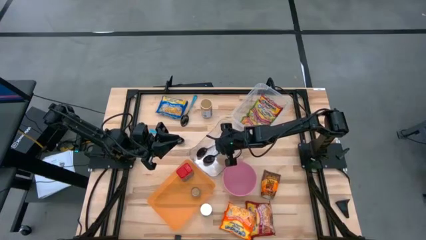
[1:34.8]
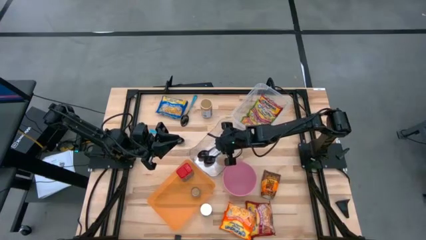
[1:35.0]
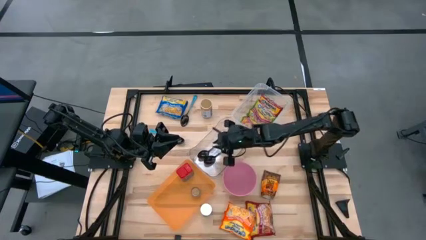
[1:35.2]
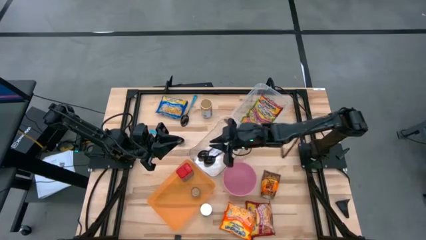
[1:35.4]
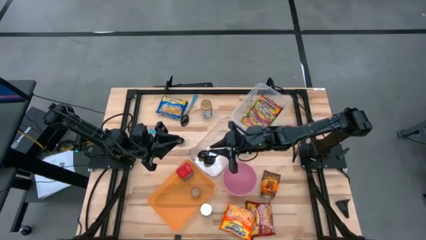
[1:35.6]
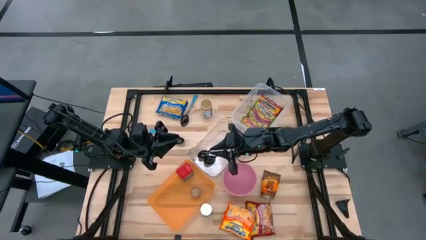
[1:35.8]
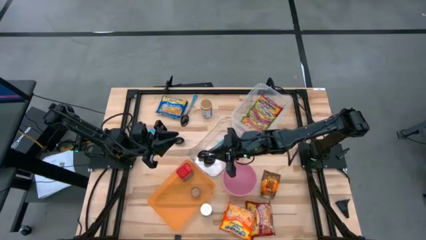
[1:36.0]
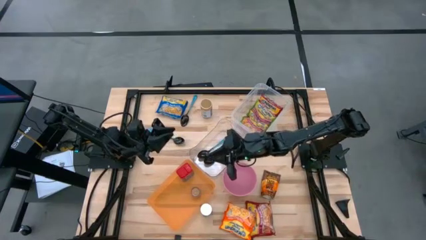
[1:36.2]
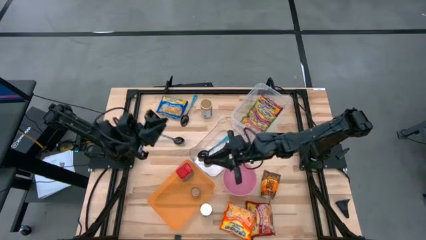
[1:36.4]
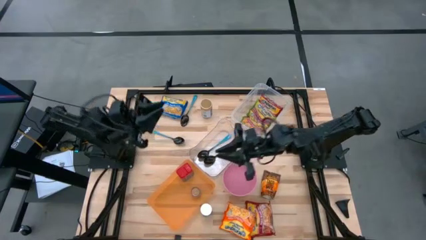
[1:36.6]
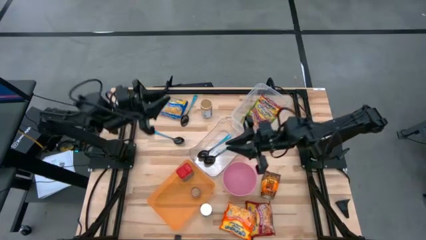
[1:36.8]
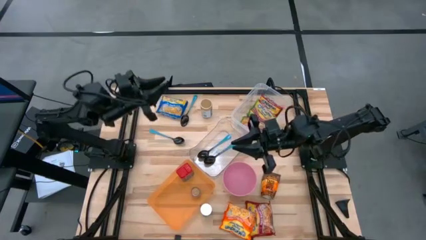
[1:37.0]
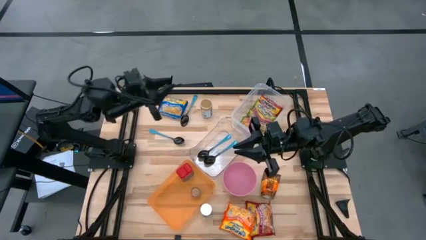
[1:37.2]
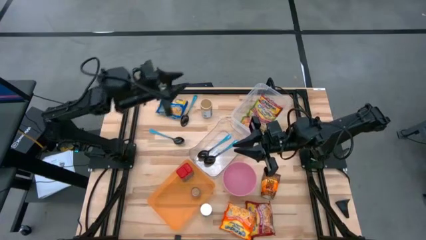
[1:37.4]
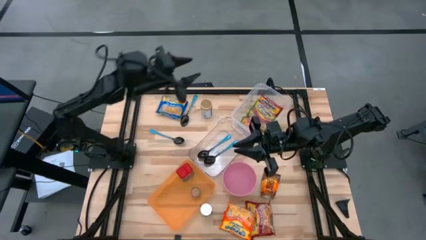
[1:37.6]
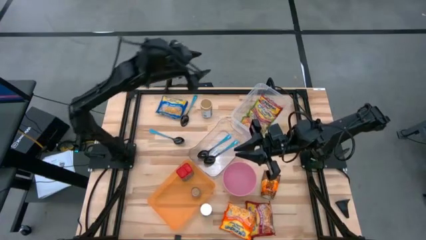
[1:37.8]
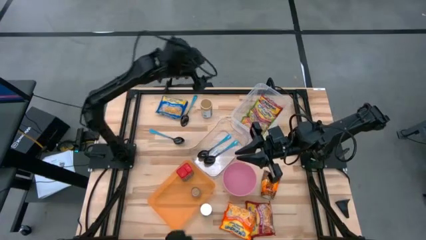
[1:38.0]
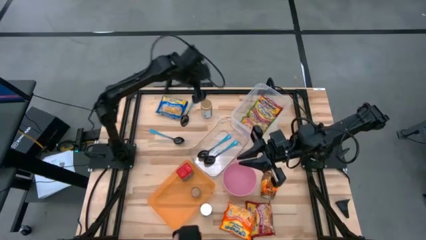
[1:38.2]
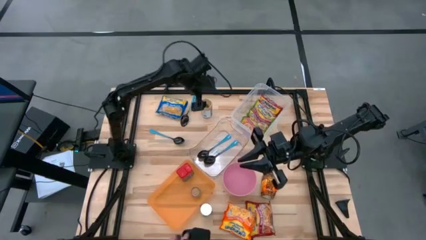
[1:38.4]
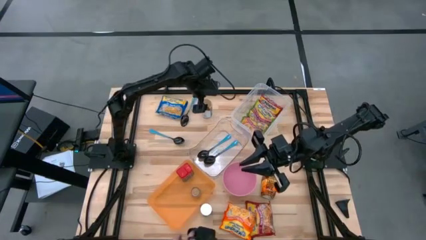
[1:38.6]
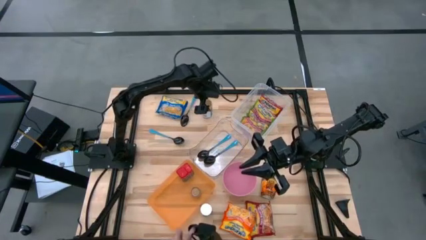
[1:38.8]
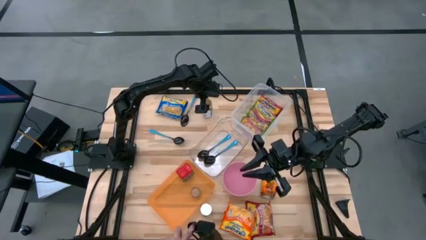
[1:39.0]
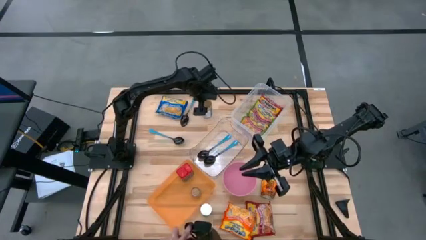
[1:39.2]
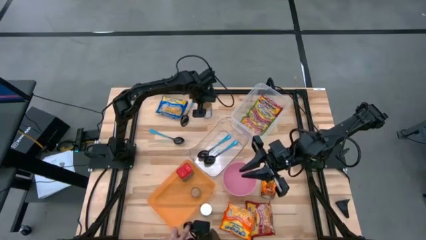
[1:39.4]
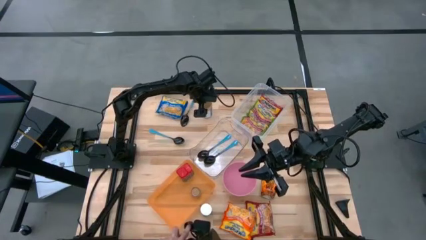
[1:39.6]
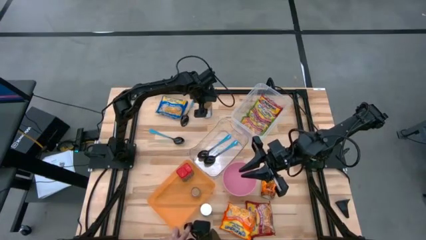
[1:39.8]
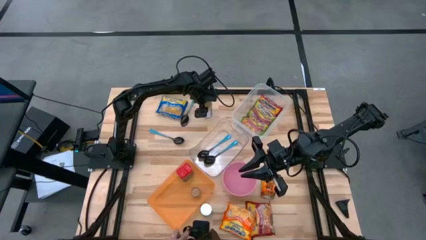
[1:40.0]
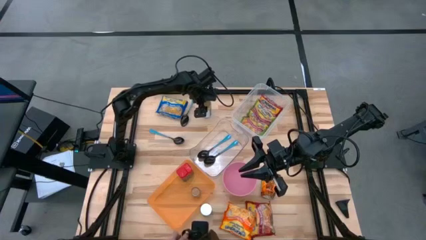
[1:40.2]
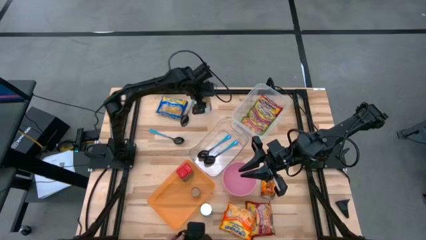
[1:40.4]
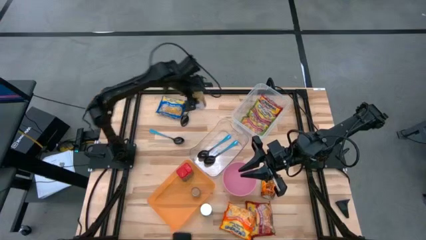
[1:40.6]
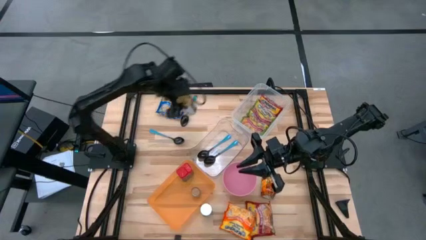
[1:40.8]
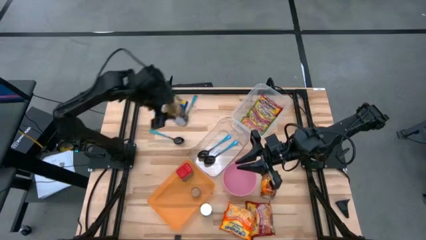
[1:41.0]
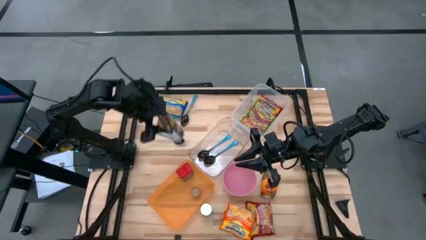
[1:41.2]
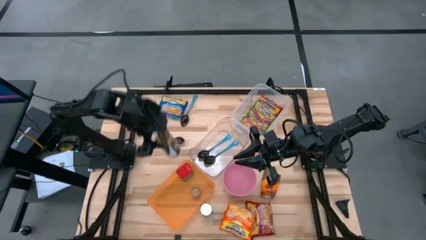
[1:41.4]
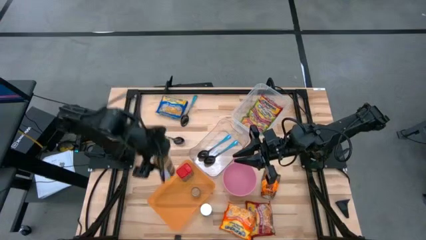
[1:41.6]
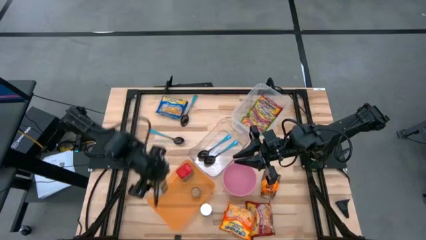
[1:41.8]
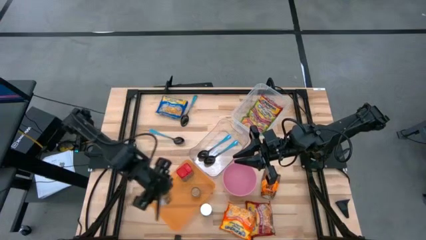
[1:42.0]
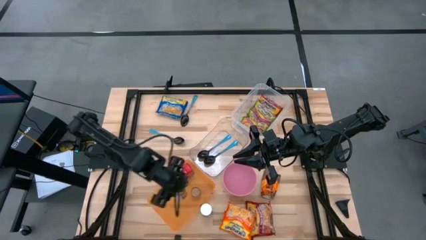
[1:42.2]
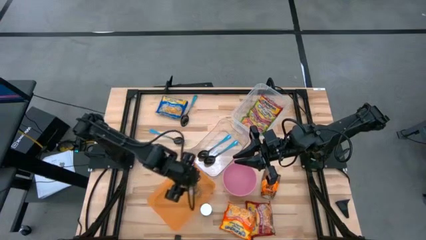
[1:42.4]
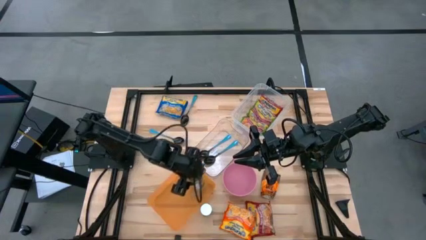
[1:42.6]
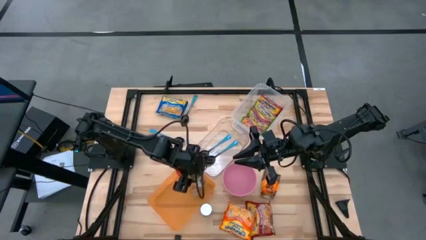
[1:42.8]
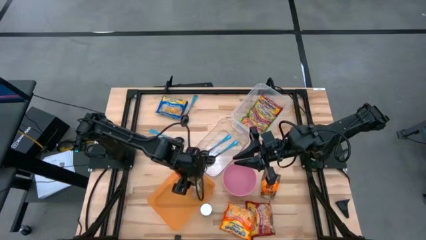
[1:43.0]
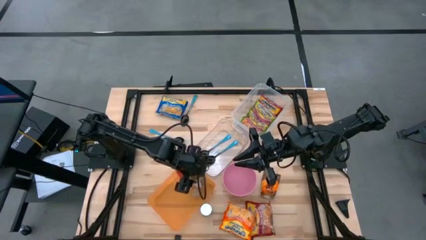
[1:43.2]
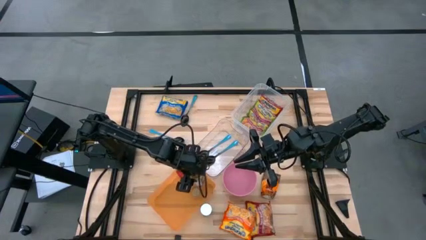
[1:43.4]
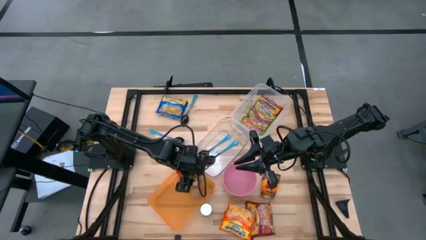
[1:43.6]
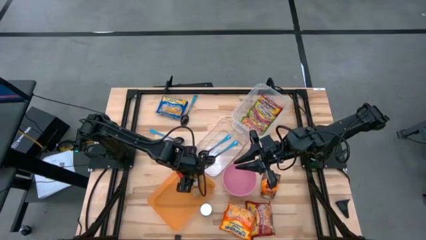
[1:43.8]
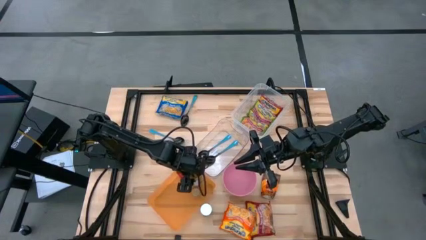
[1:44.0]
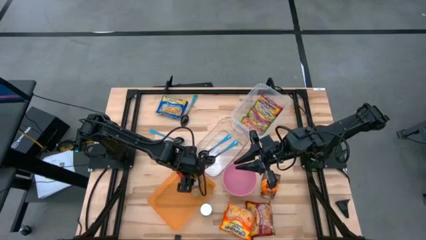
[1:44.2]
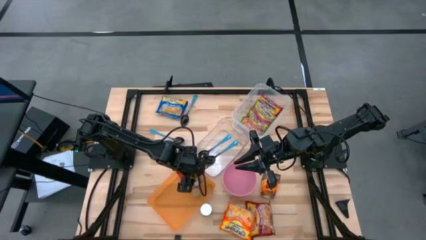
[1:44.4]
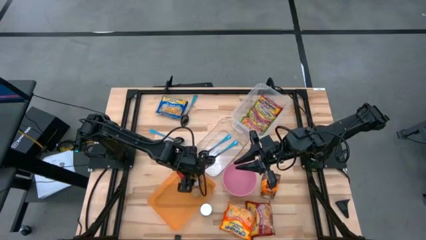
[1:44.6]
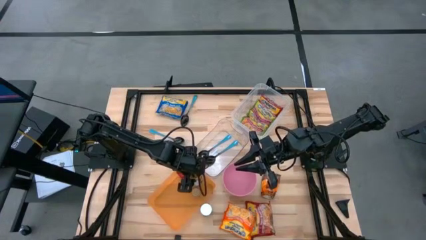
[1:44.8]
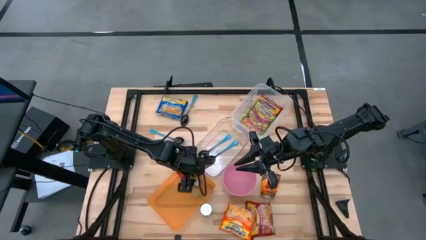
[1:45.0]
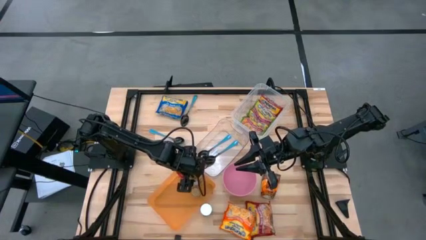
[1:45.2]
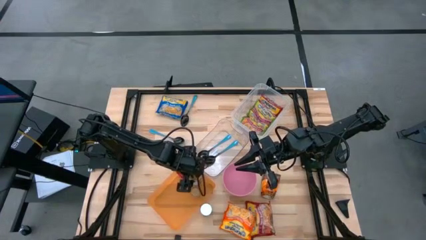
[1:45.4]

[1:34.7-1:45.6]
Task: Pick & Place Food Item
Put the gold seasoning bottle into the orange bin
